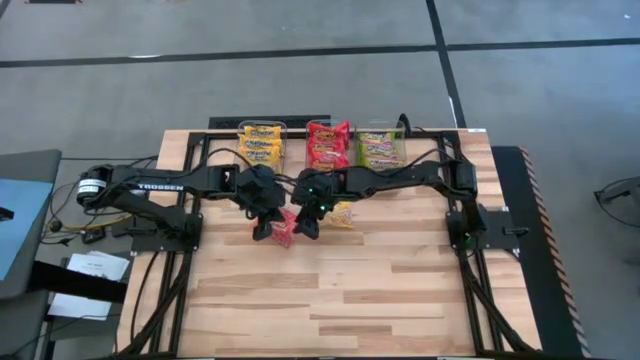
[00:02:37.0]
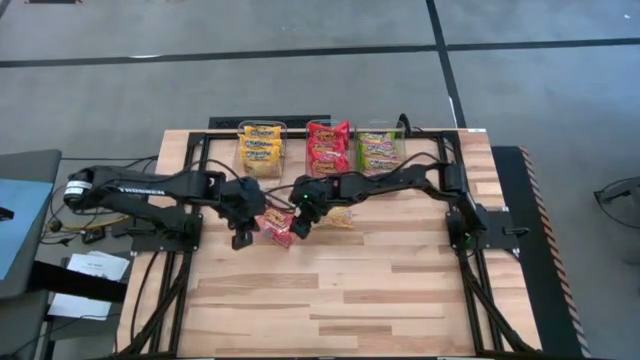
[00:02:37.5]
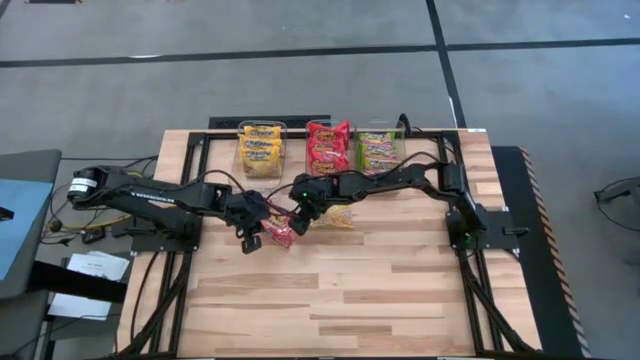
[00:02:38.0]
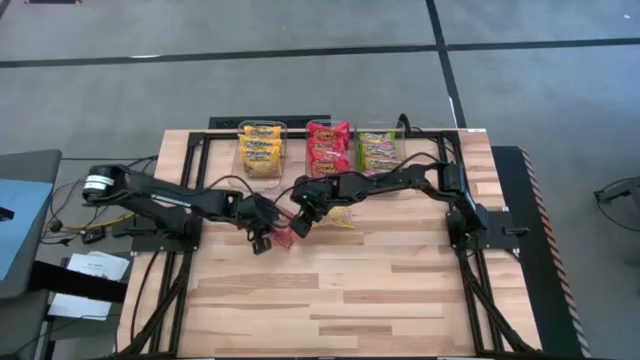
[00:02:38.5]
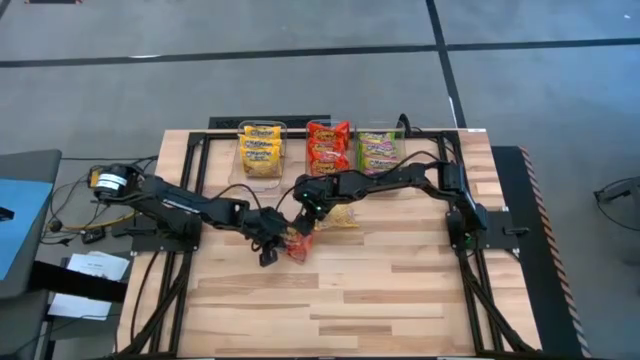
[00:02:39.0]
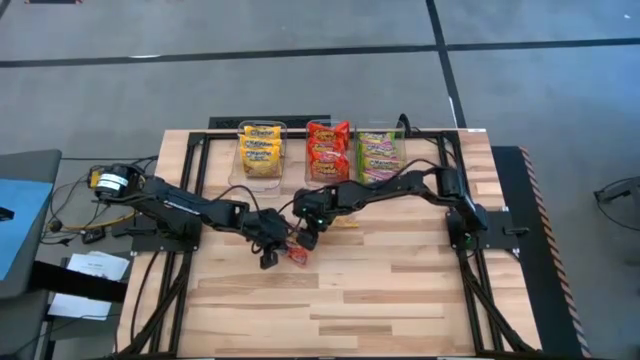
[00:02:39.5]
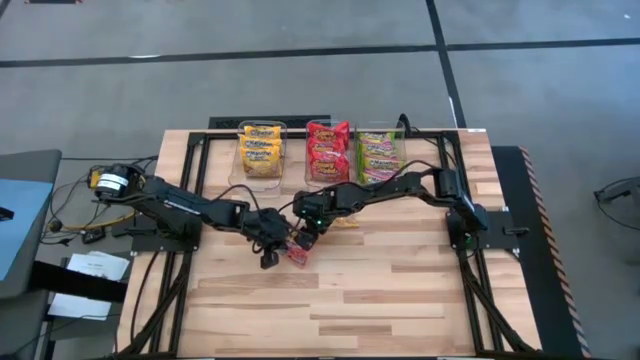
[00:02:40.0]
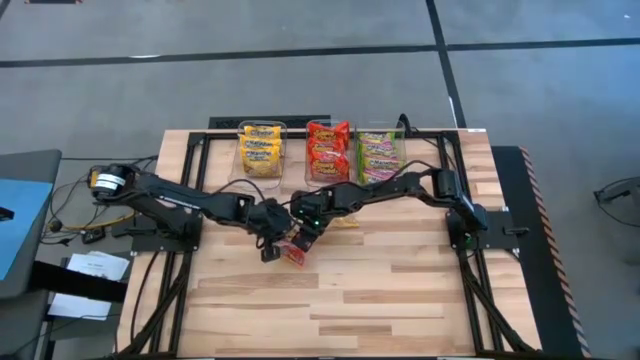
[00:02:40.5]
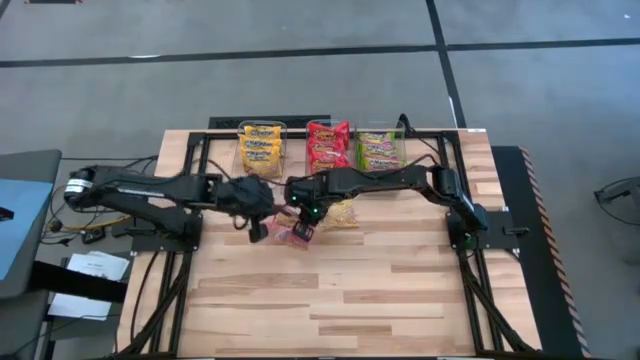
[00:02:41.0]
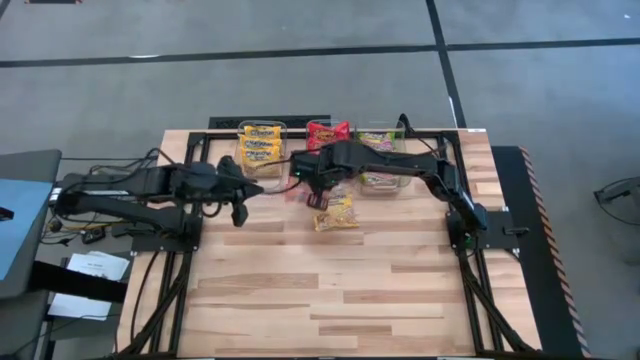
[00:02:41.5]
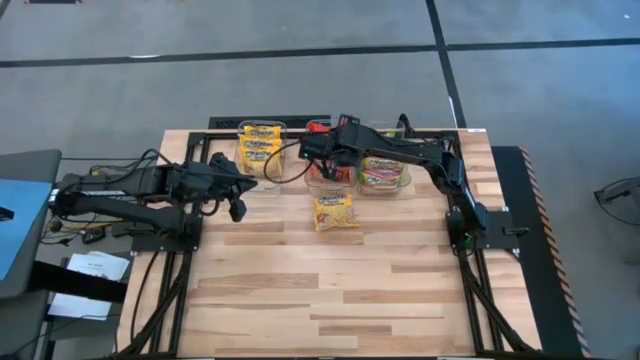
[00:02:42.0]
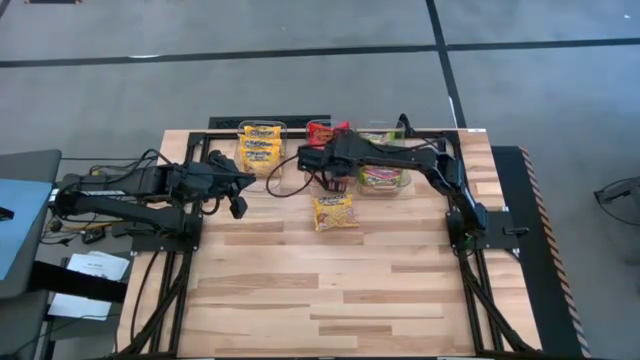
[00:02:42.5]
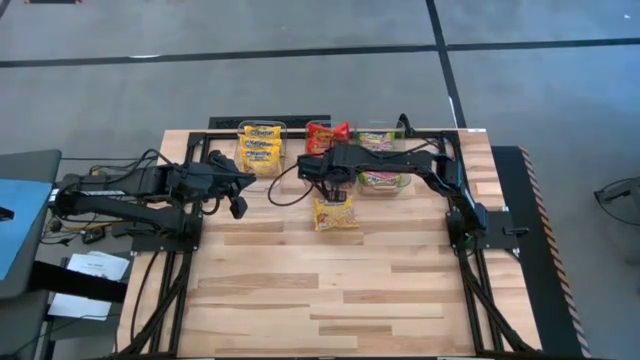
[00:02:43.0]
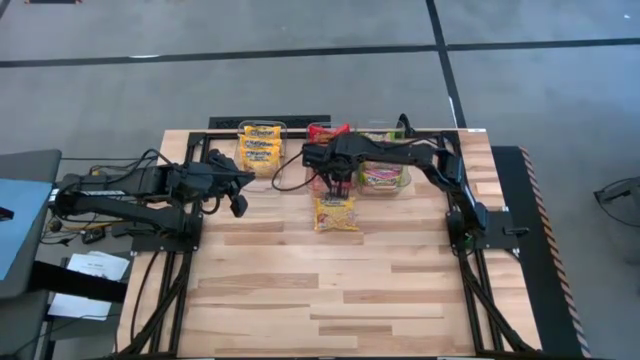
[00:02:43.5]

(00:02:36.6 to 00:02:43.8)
Task: Sort Maruchan noodles
Put the orange noodle pack into the middle transparent bin

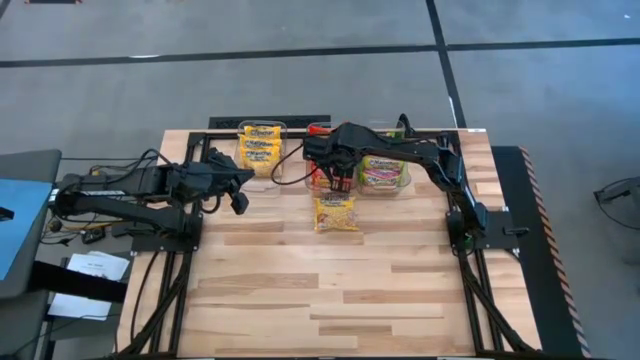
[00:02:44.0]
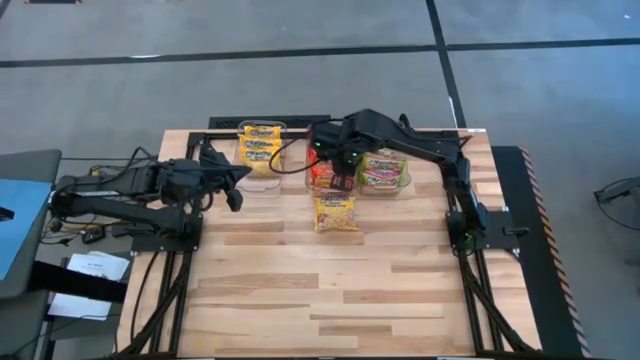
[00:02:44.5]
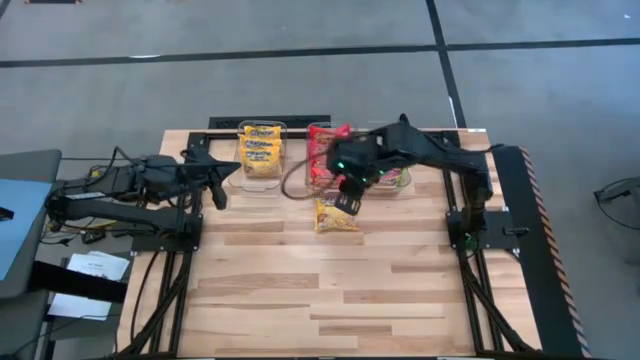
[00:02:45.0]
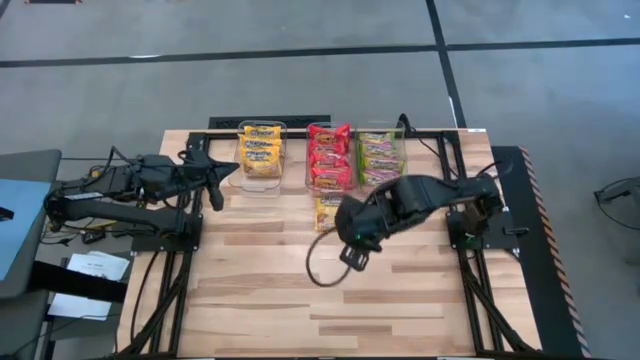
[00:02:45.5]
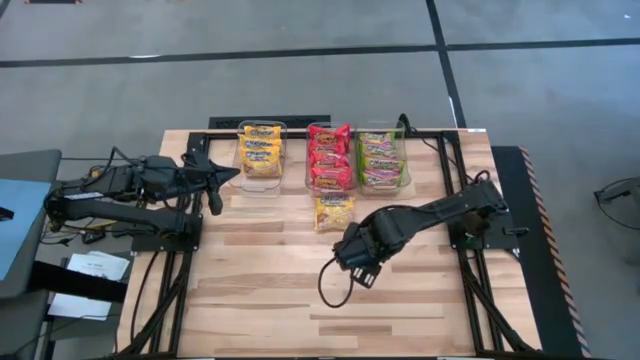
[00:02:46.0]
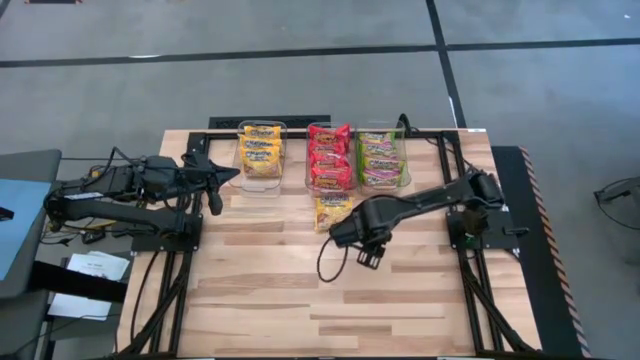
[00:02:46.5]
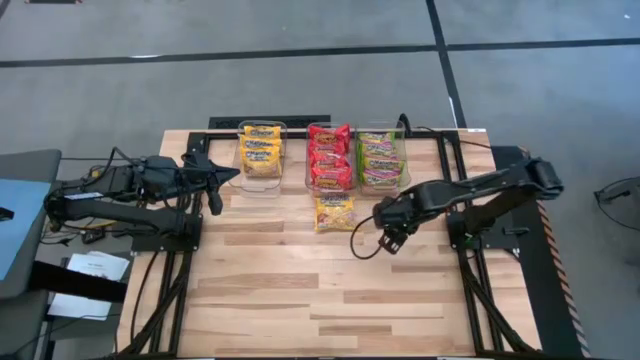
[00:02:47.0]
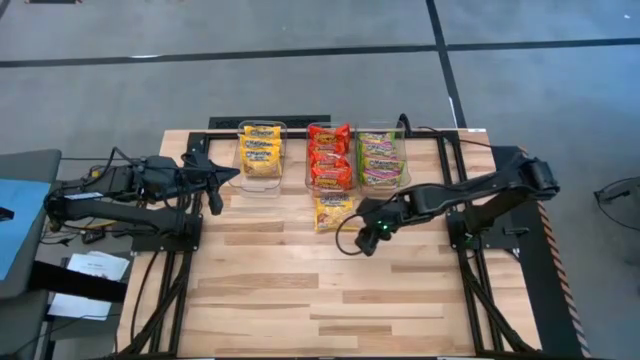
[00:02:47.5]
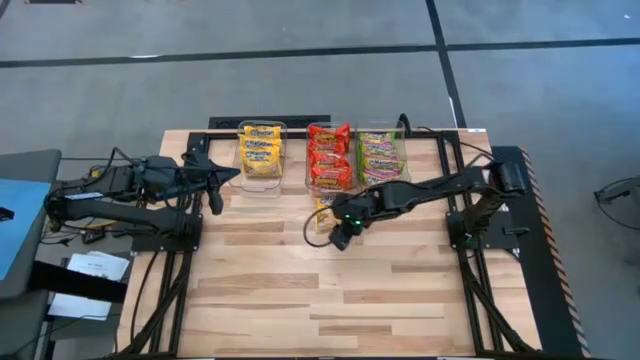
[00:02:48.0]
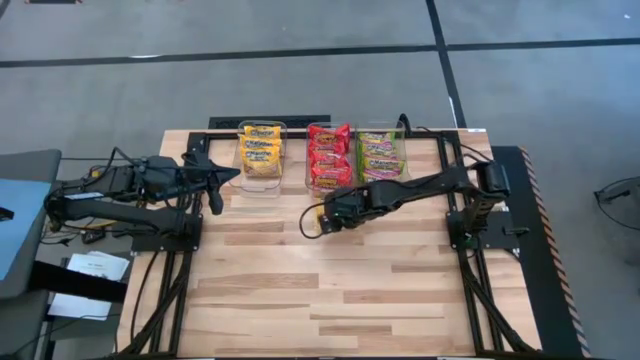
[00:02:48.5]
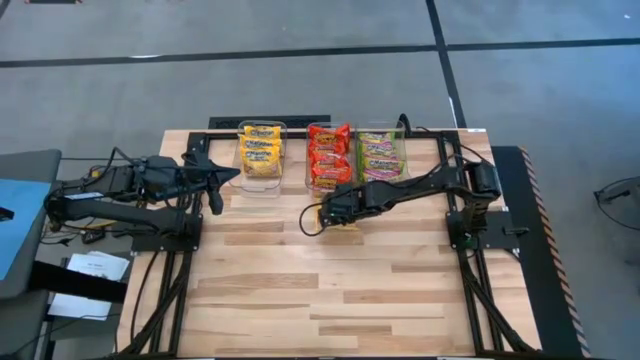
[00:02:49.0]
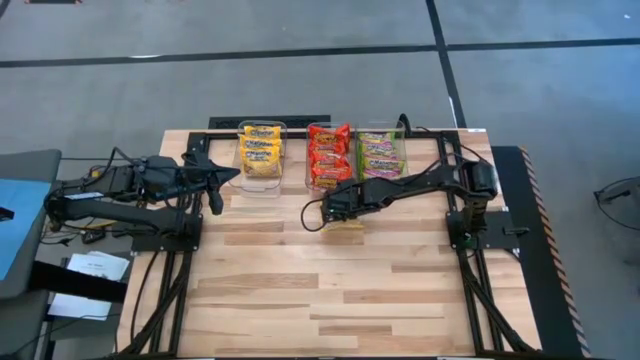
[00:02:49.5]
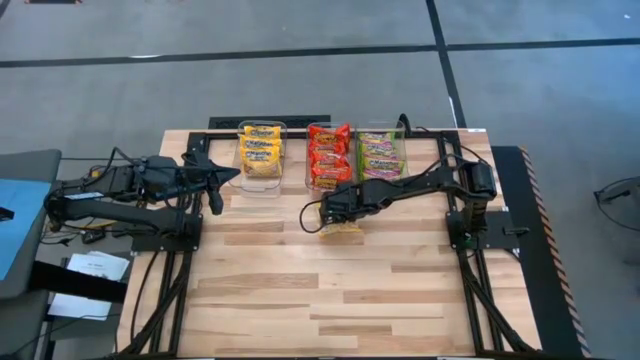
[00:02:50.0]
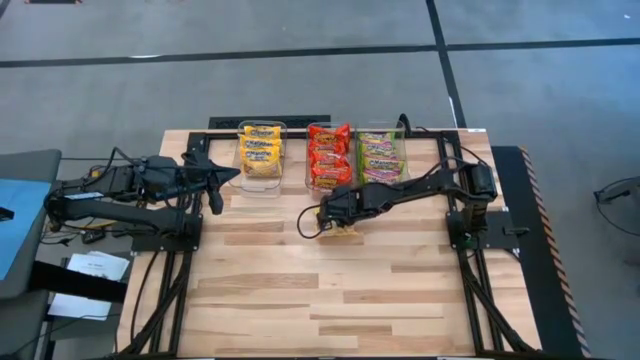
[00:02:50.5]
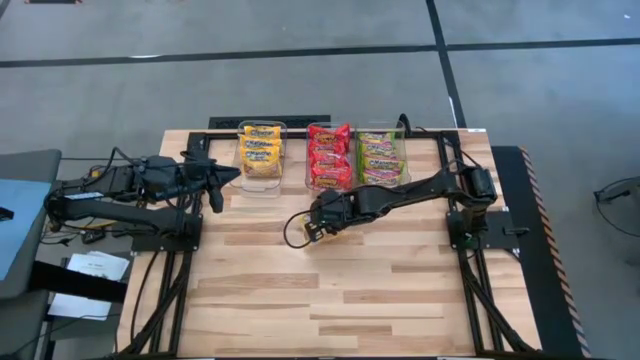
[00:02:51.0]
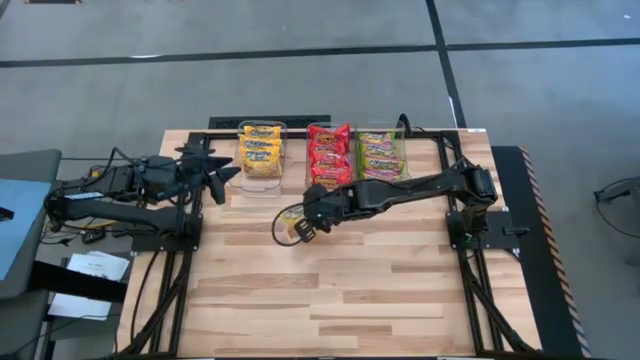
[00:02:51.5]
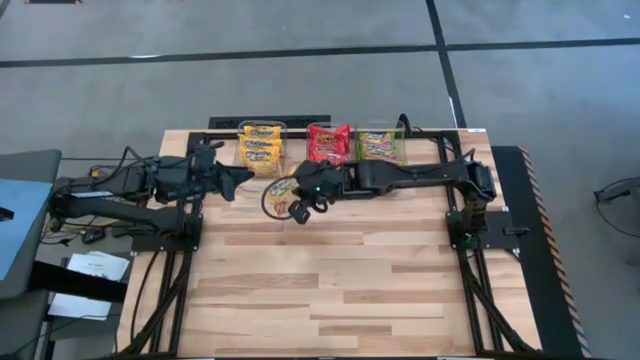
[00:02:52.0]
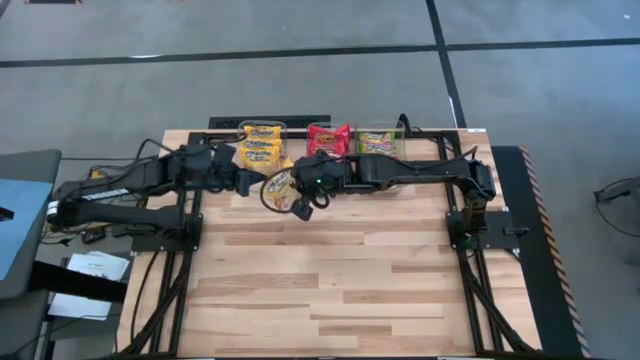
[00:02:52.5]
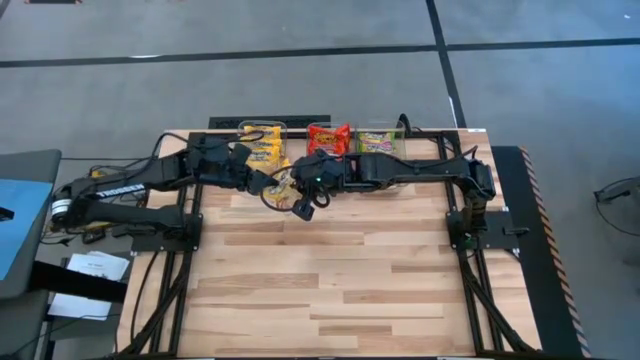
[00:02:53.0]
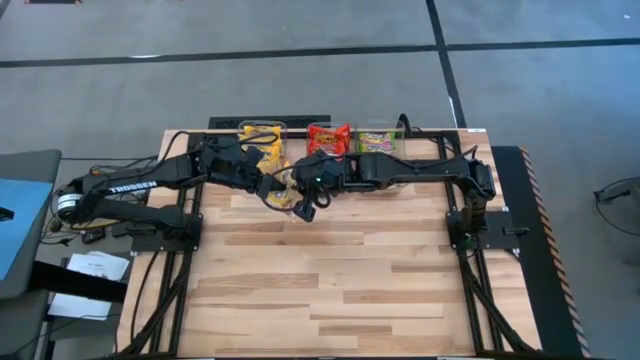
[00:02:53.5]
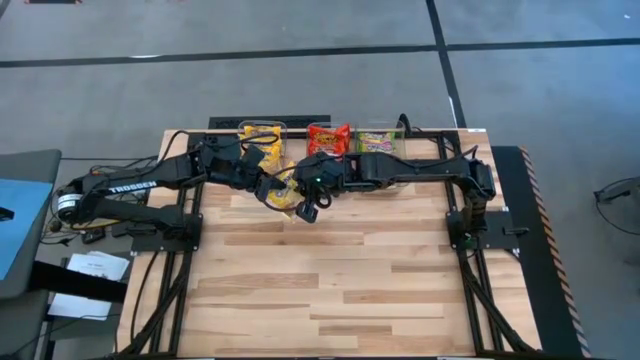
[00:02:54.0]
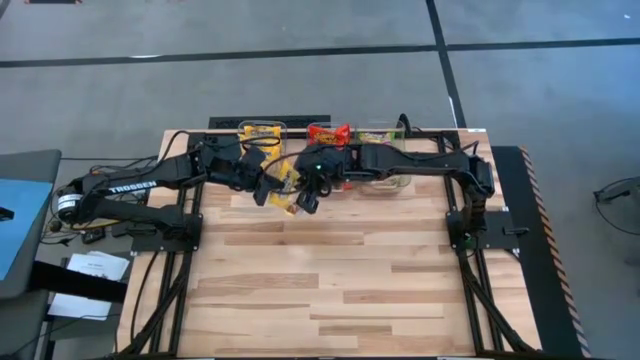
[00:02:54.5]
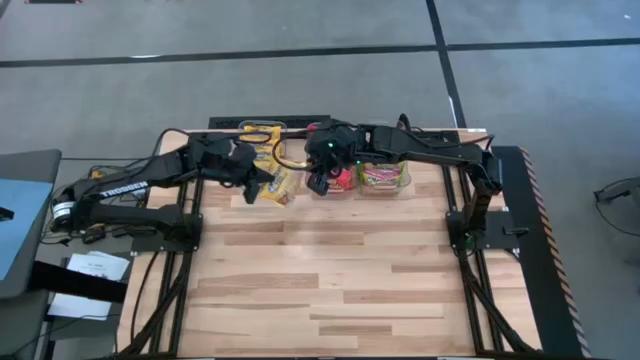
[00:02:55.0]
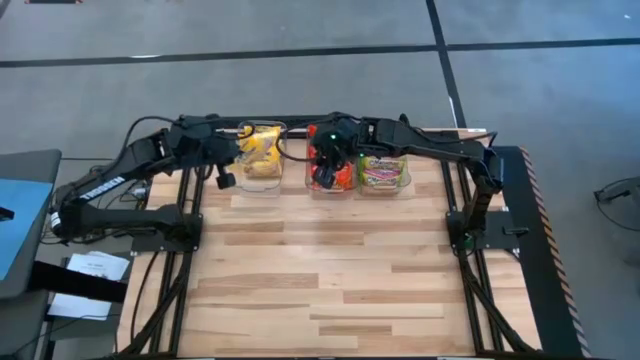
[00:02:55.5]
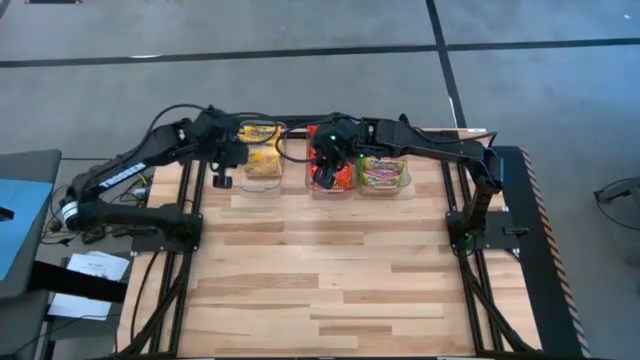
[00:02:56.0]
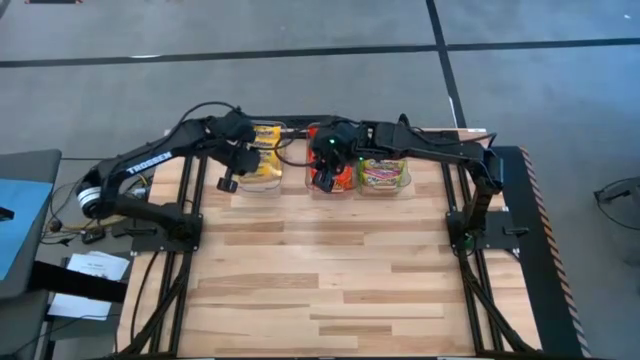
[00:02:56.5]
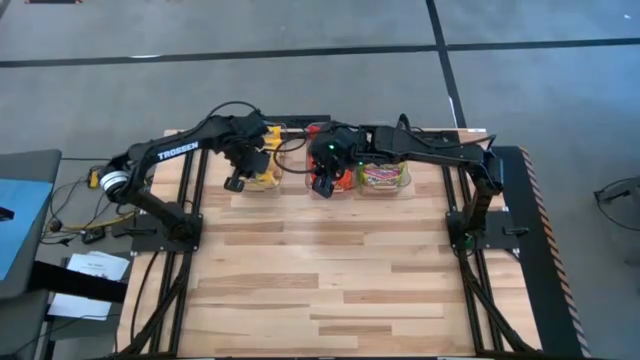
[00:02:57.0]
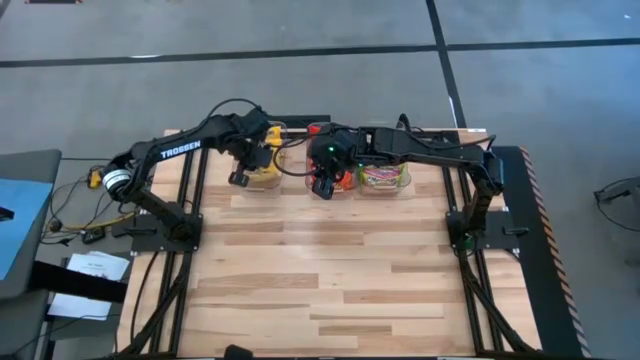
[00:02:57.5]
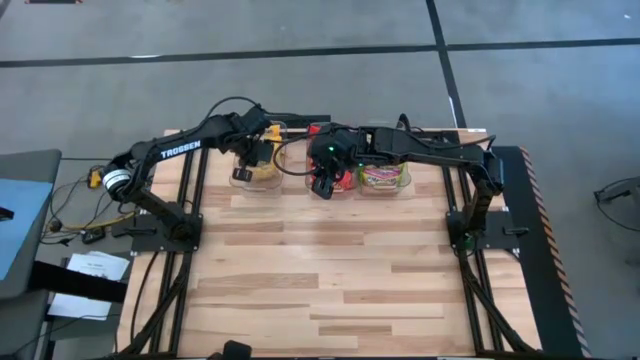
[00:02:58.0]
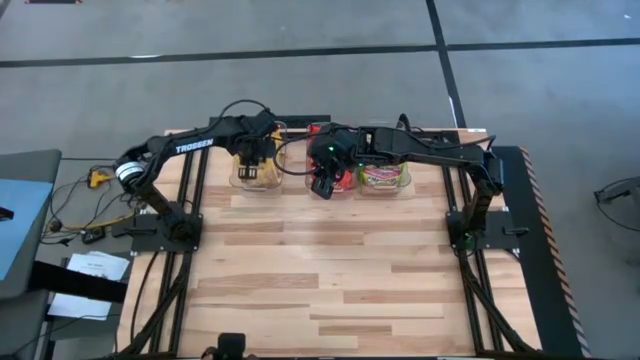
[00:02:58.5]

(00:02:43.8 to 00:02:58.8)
Put the yellow noodle pack into the left transparent bin
